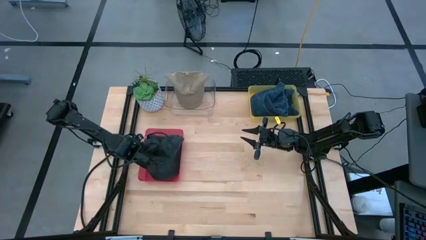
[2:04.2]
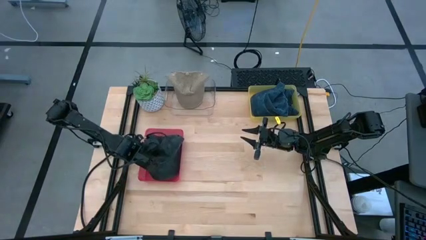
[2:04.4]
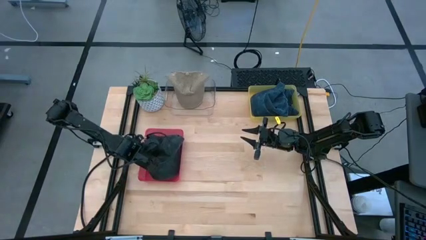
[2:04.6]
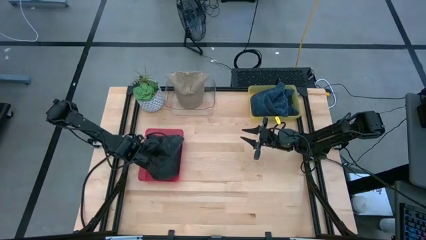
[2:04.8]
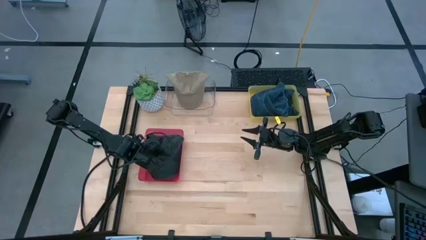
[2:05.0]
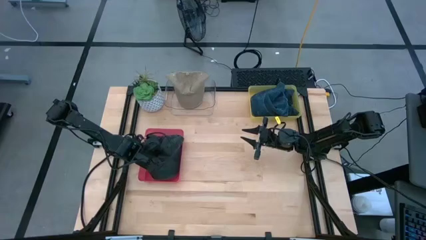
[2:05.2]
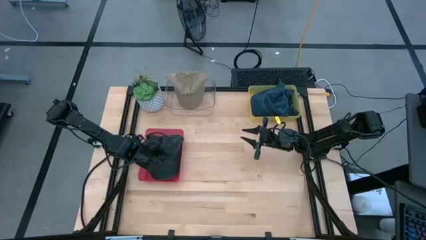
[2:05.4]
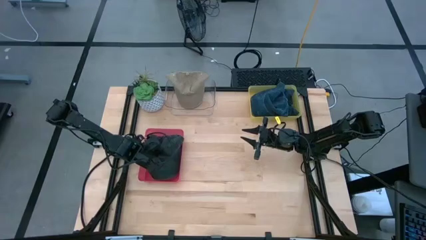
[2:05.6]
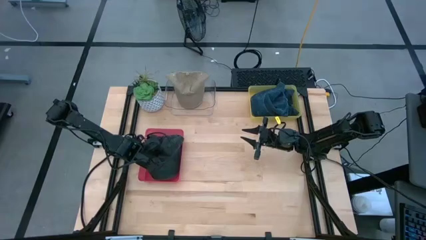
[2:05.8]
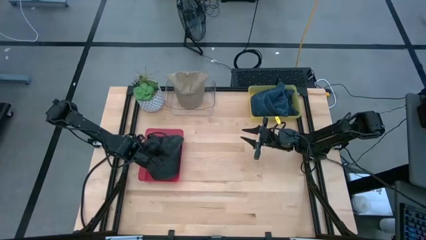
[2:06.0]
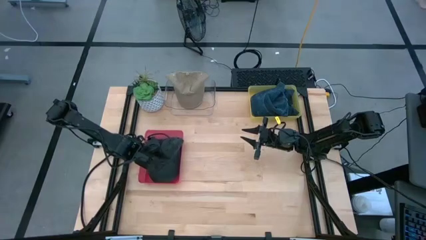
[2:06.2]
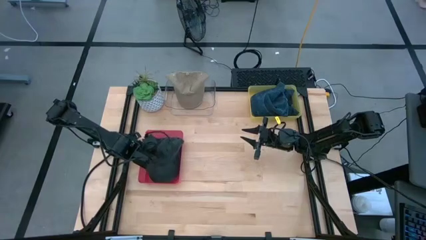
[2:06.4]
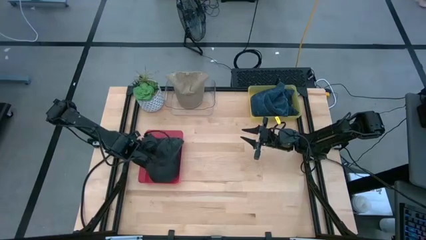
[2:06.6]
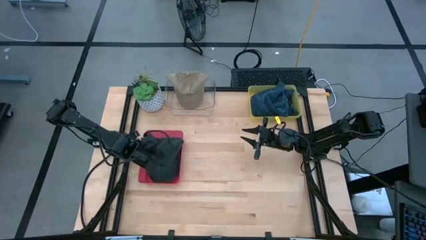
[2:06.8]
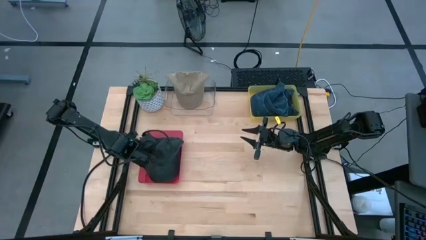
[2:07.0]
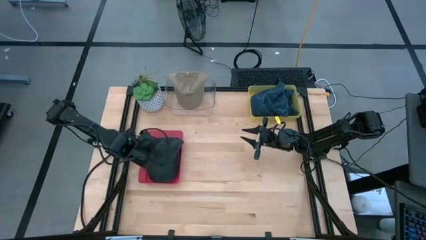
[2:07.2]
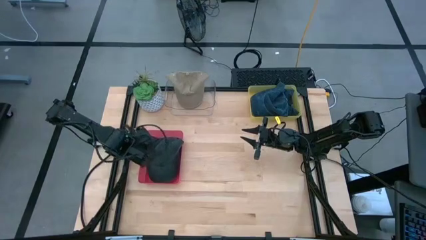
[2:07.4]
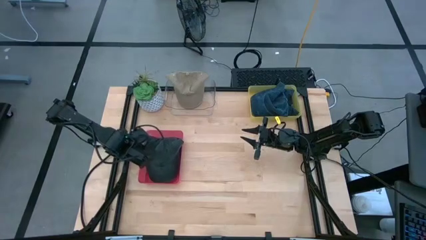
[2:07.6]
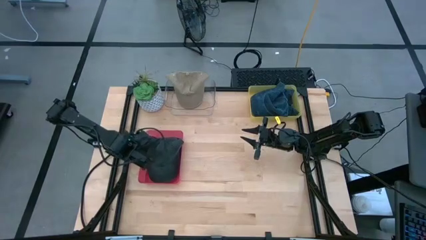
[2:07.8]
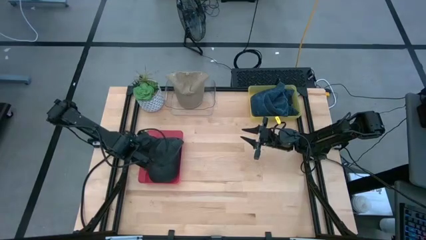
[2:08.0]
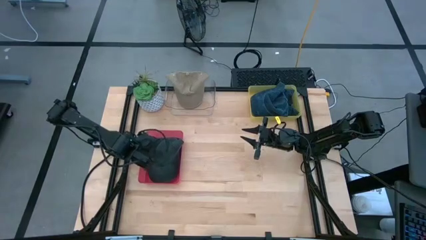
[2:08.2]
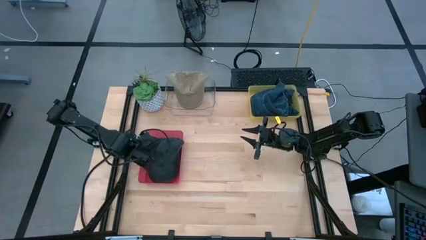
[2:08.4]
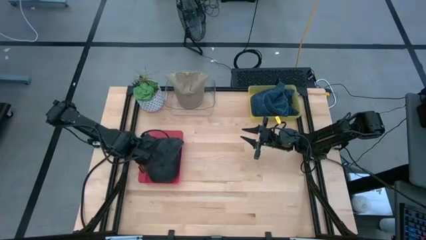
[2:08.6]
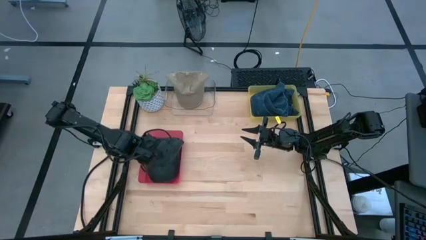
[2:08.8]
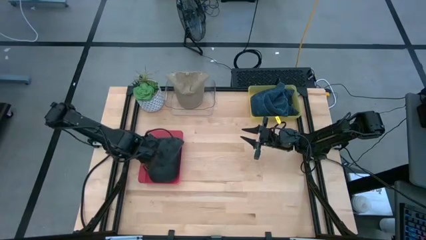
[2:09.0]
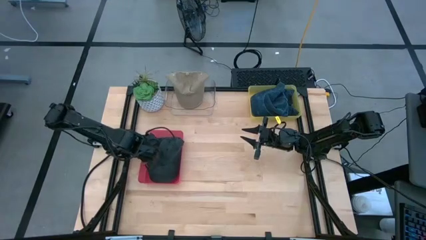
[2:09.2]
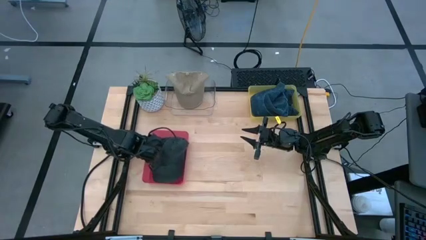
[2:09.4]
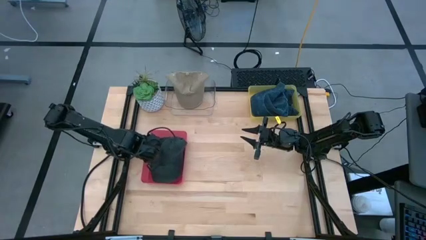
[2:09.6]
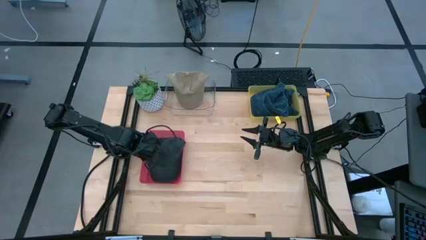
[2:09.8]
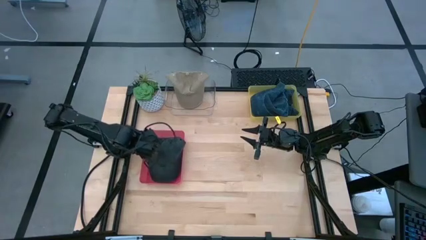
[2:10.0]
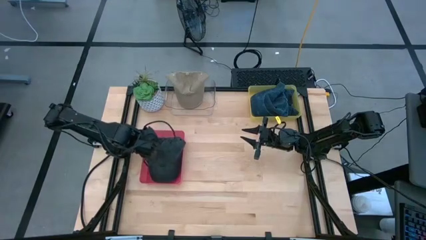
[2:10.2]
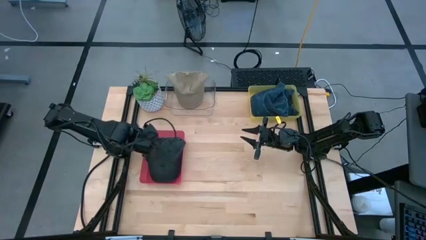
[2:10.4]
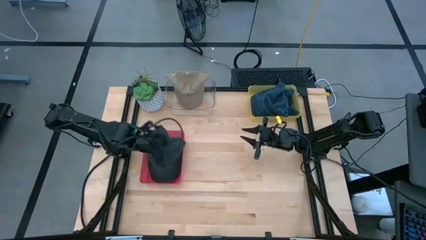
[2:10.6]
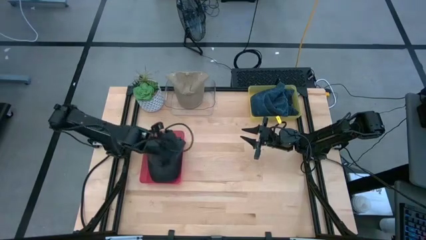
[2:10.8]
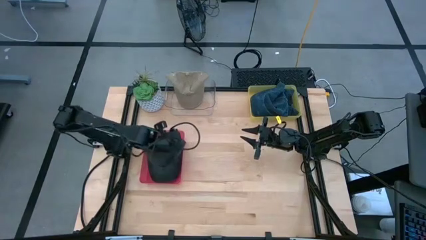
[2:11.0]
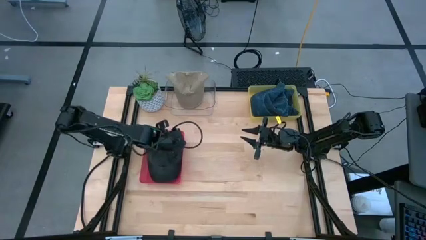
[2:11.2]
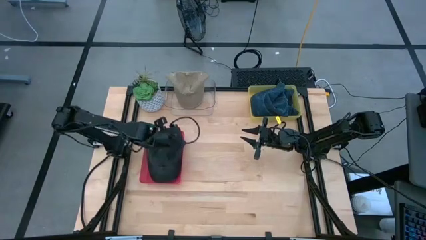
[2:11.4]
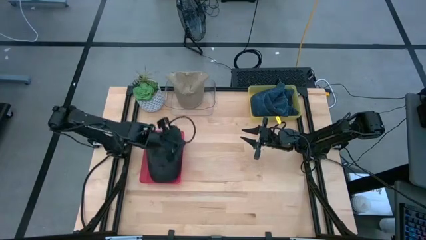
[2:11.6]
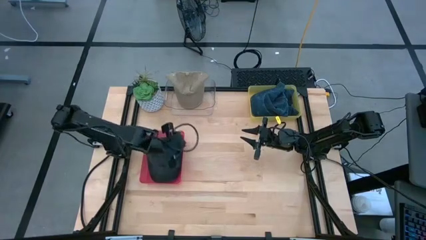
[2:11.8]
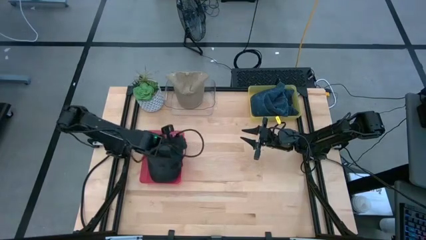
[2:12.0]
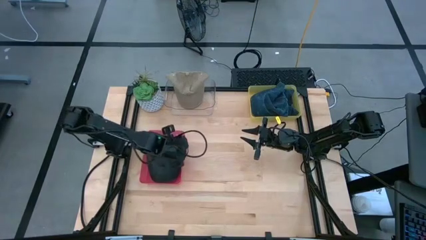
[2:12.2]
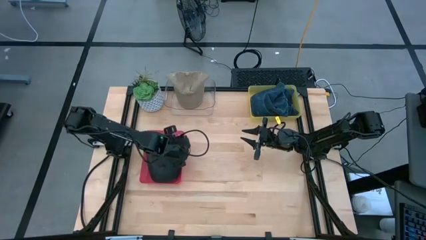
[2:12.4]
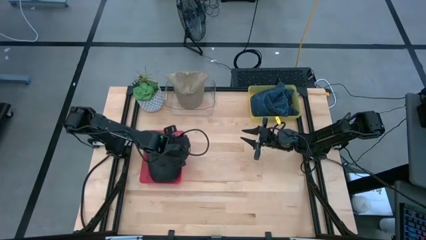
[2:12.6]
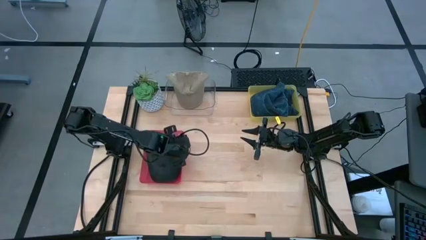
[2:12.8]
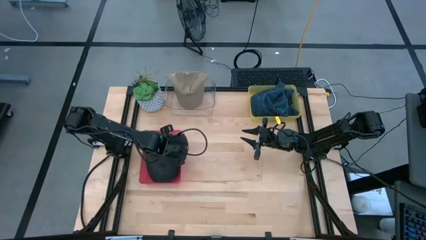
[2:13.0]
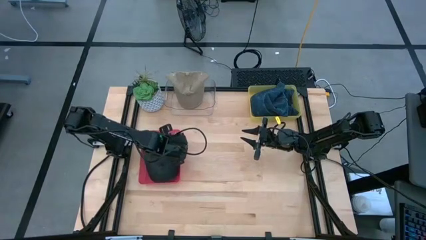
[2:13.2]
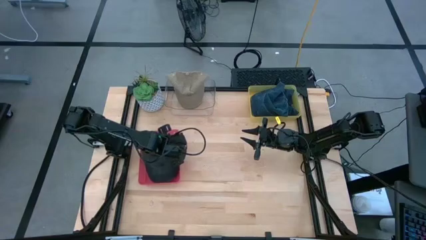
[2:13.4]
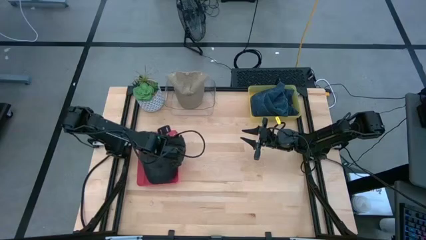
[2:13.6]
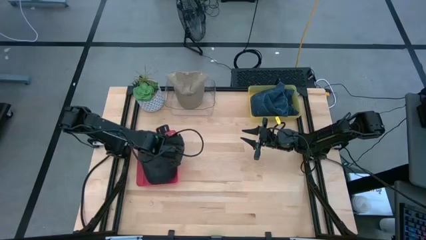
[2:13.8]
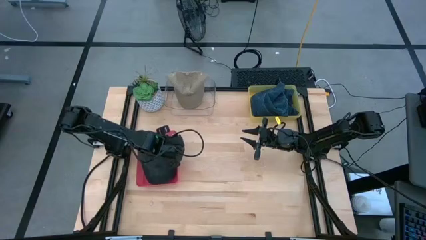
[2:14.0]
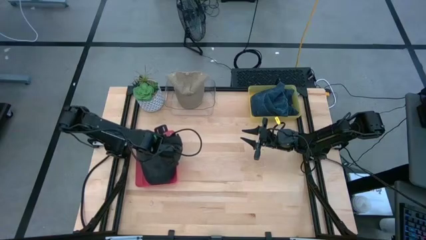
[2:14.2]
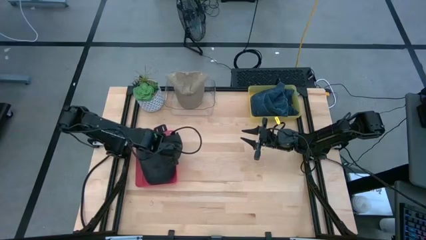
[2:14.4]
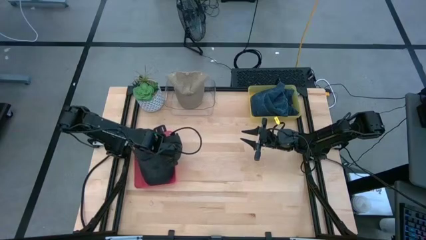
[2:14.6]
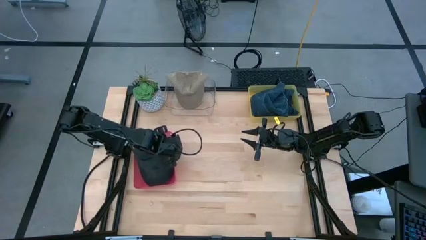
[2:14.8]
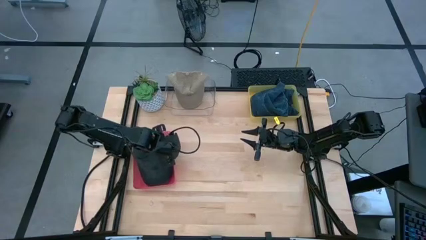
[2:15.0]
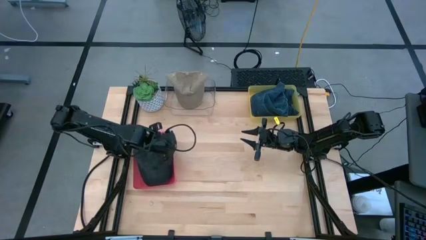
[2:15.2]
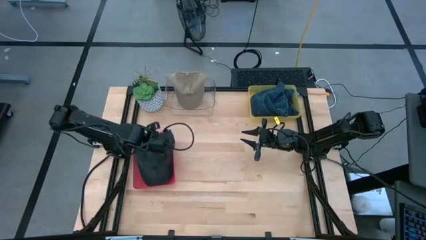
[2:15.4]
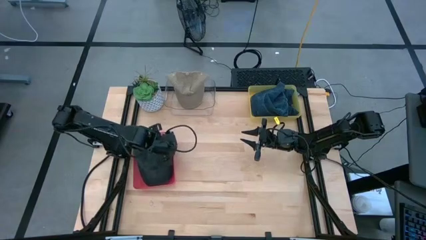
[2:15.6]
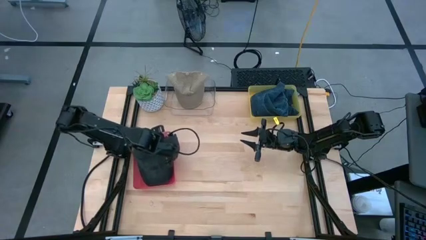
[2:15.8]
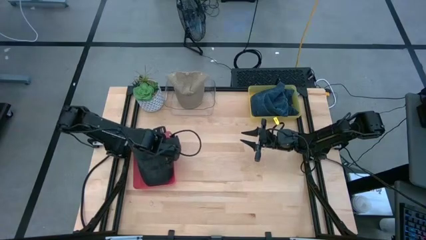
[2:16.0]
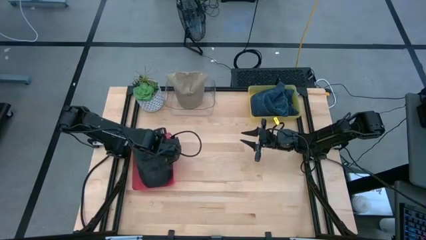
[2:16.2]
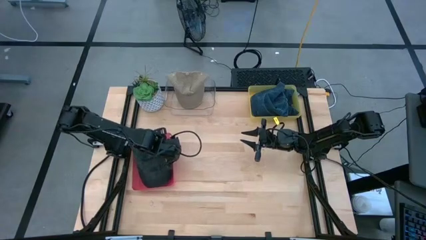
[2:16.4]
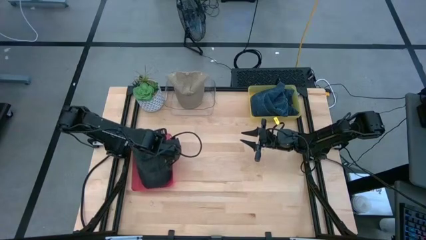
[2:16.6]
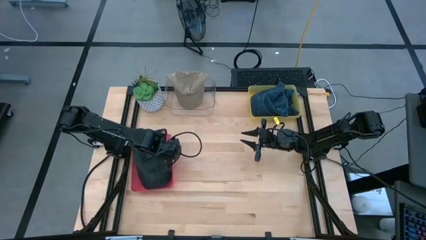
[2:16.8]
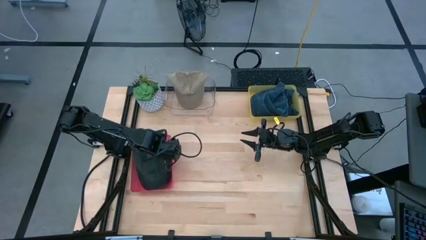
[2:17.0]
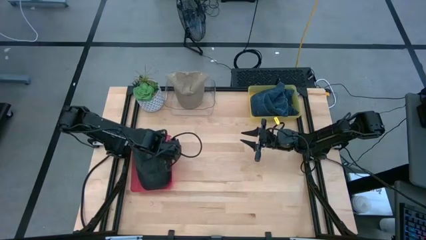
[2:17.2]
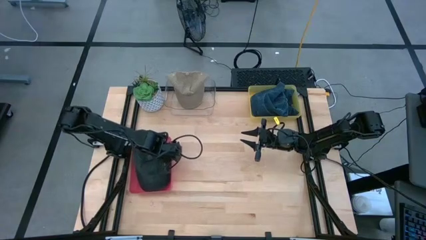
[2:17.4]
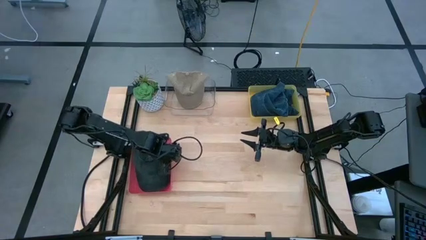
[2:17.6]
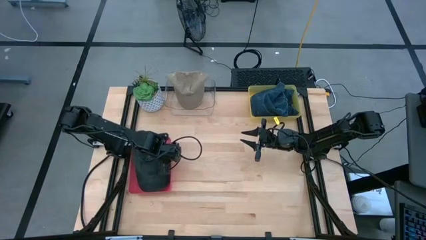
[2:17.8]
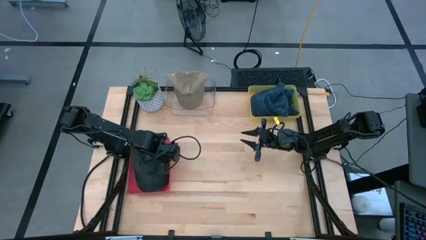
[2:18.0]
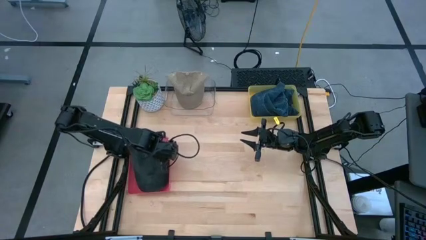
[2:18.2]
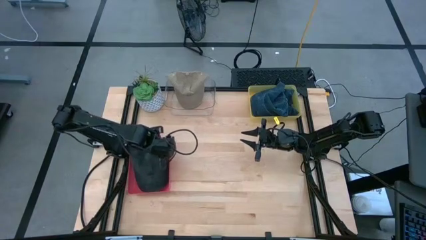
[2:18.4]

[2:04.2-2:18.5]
Task: Pick & Place hat
Put the black cap into the red bin

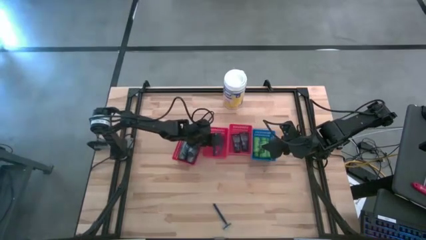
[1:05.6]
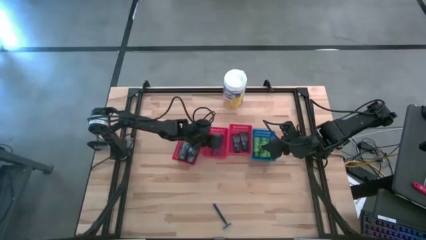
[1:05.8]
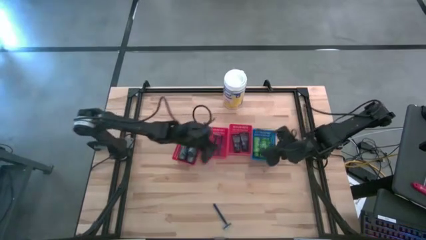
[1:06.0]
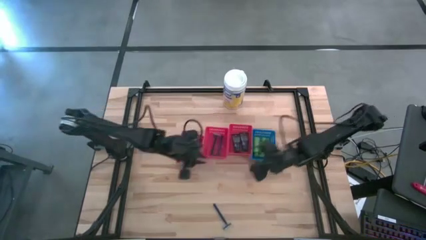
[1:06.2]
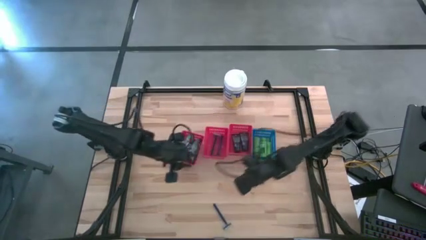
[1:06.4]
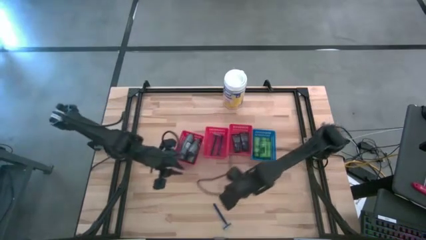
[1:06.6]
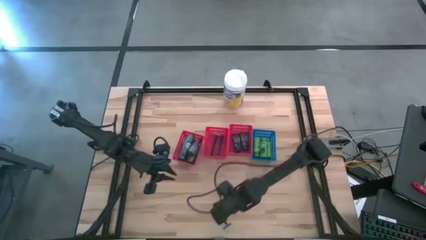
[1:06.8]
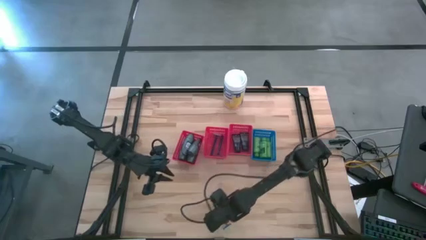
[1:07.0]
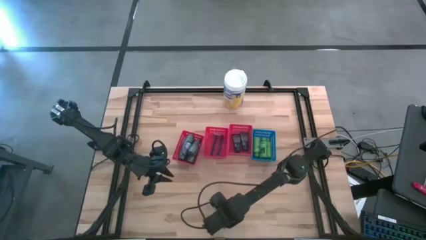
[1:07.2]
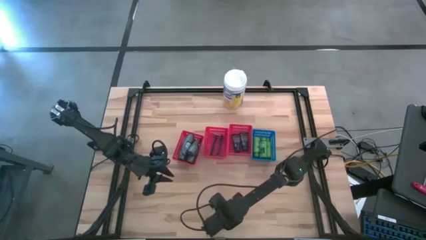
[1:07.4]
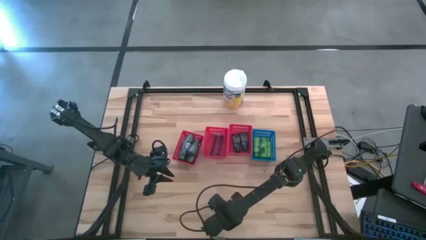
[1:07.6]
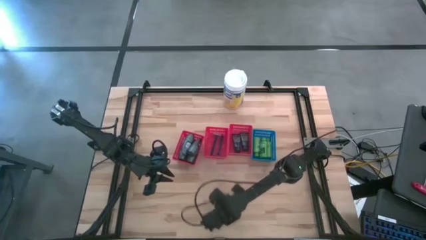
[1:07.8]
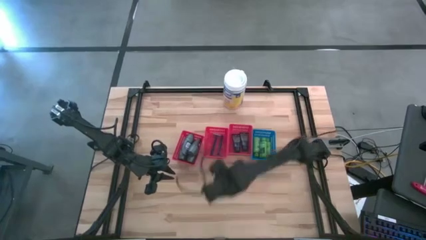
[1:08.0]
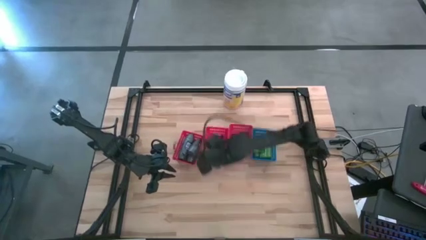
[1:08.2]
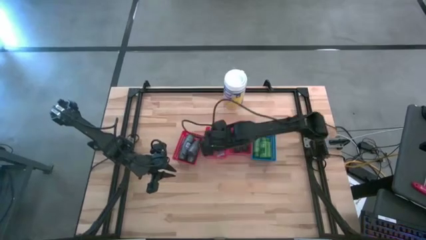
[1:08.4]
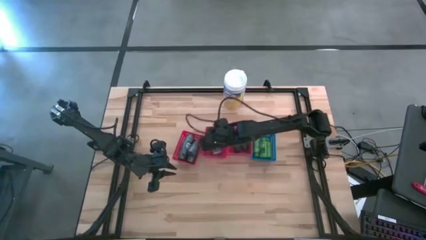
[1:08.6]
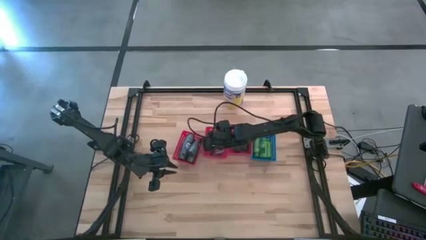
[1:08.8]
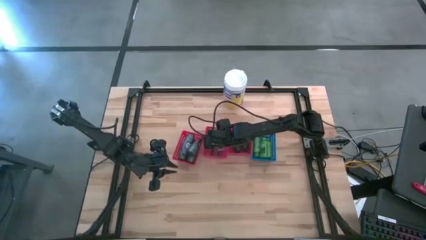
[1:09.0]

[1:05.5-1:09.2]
Task: Pick & Place Travel size toiletries
Put the blue razor into the middle red bin
